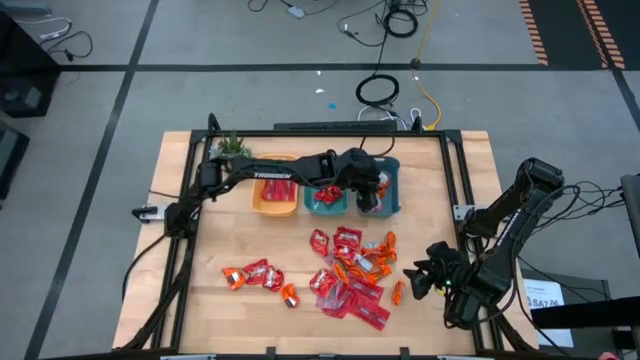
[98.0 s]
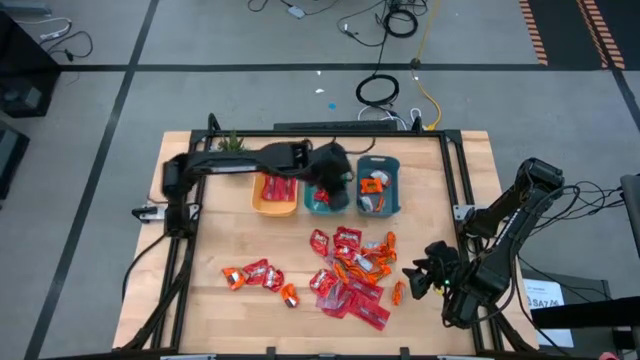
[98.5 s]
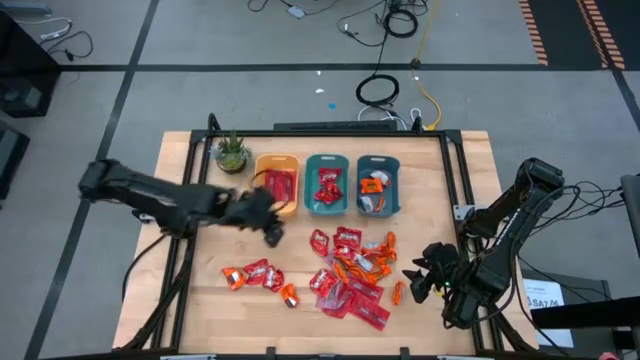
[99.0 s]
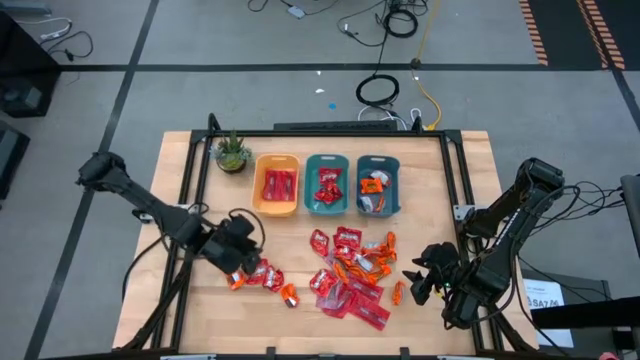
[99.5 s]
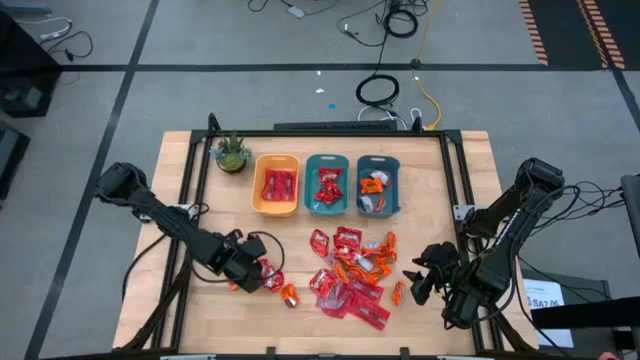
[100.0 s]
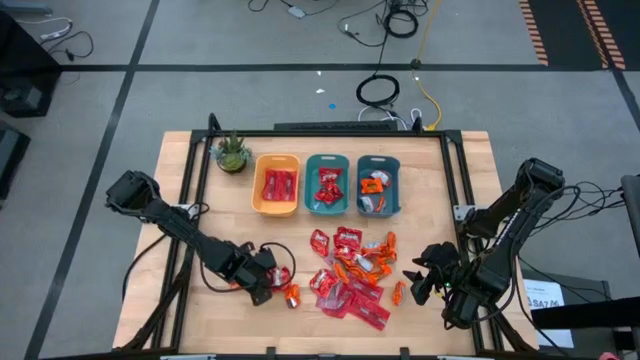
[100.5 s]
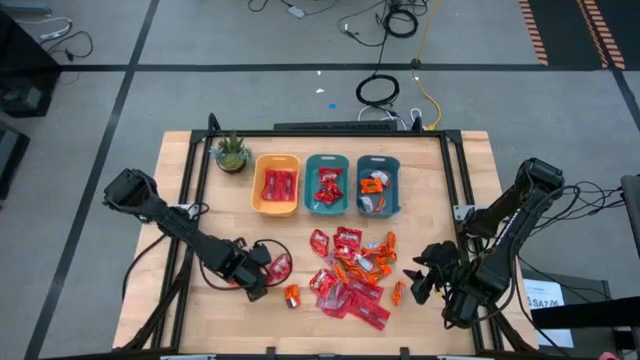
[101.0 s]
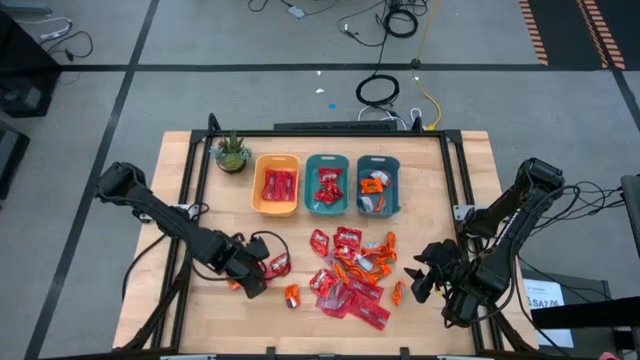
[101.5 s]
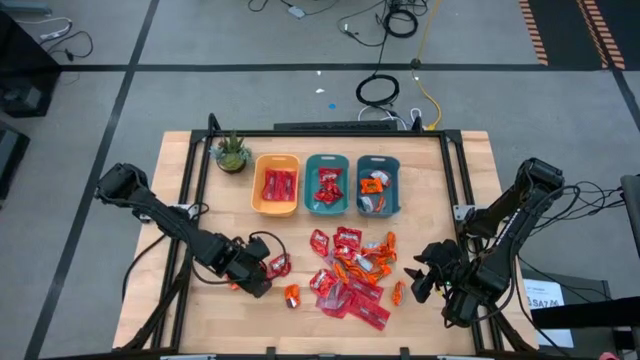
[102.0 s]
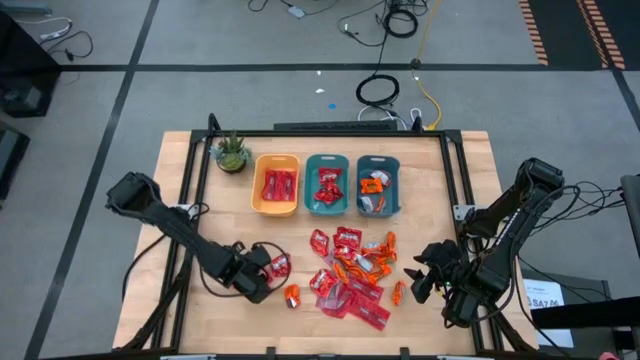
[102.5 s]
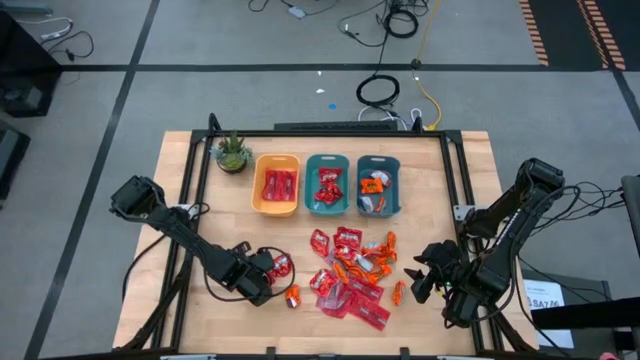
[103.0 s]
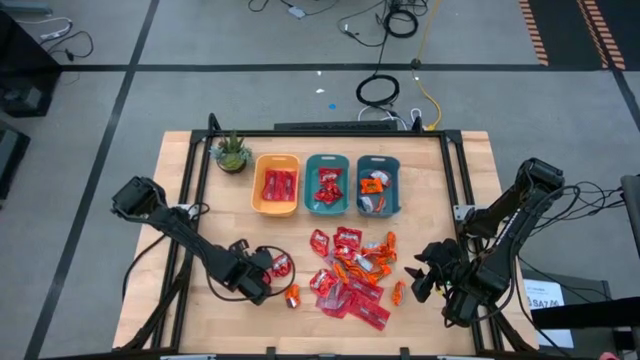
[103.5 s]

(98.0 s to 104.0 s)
Task: Sort candy
Put the red candy into the top center green bin

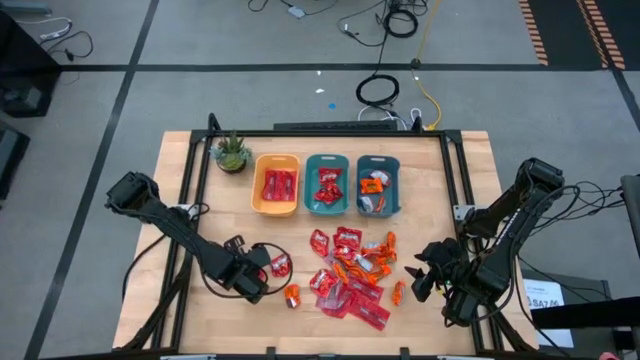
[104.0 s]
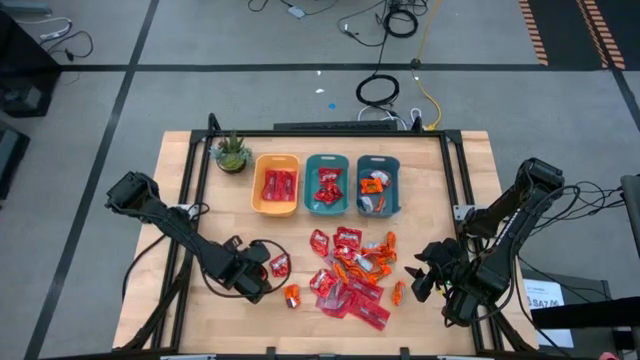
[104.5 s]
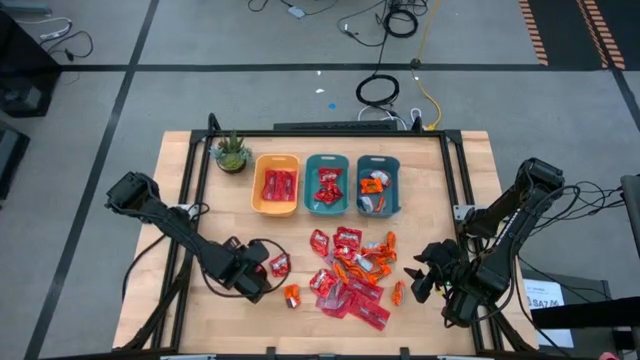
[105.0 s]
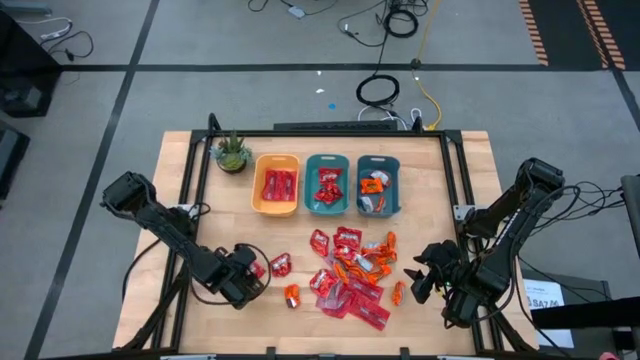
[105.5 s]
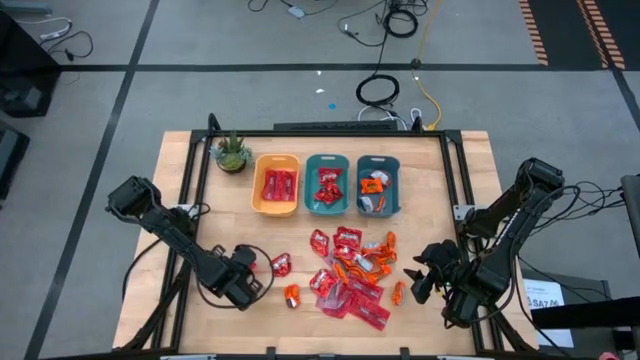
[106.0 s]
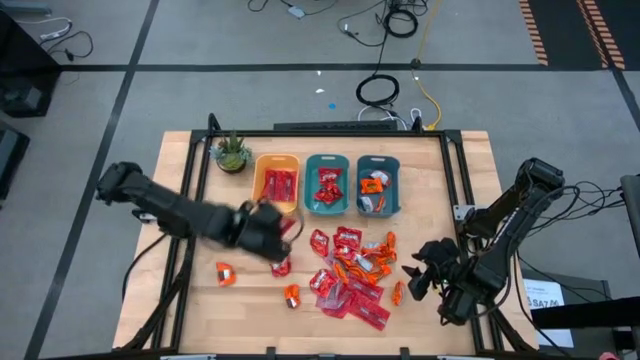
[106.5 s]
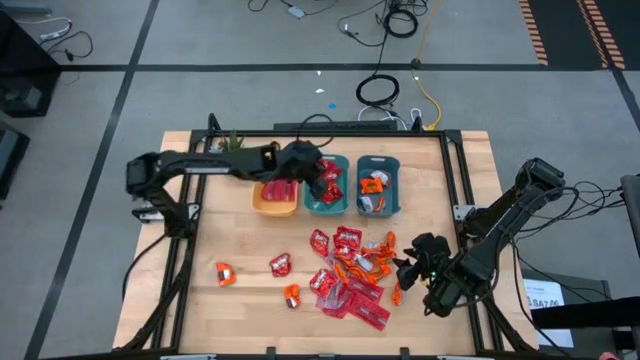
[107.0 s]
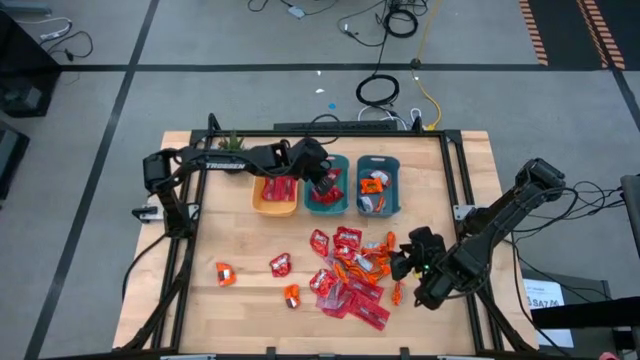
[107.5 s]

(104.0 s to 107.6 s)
Put the red candy into the top center green bin

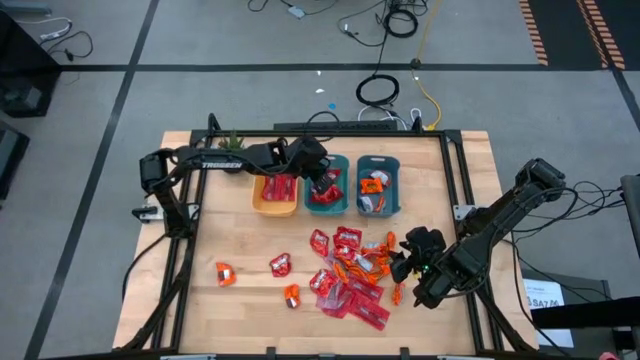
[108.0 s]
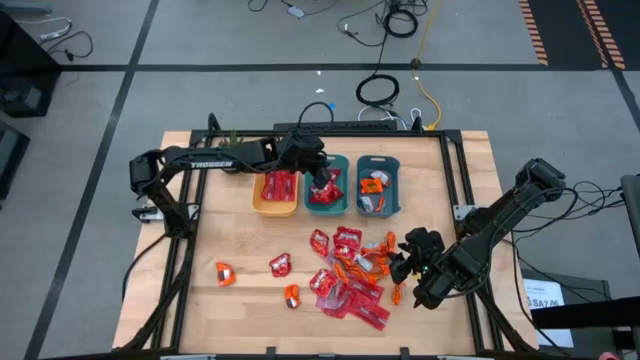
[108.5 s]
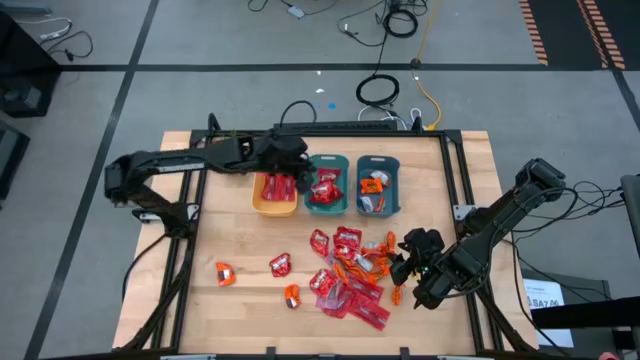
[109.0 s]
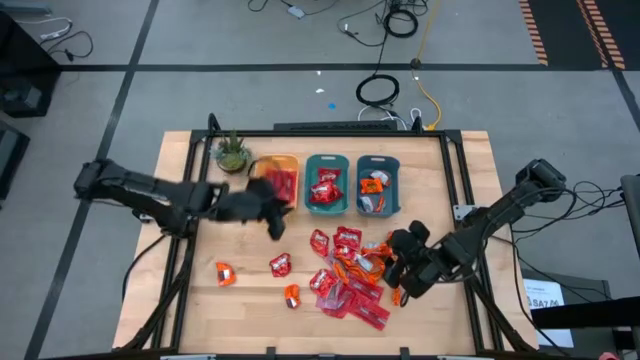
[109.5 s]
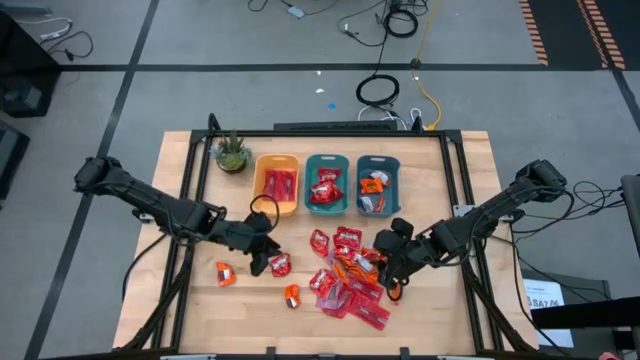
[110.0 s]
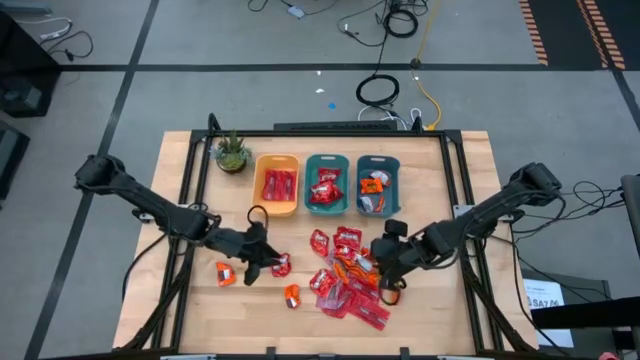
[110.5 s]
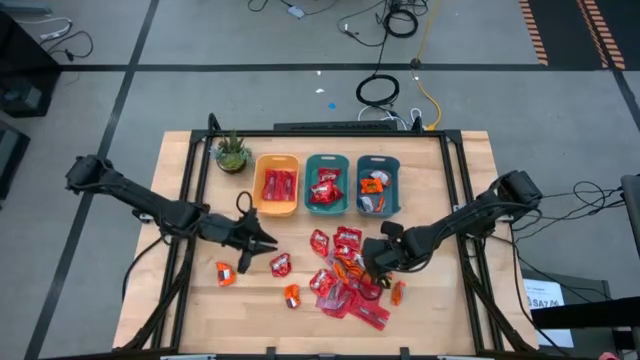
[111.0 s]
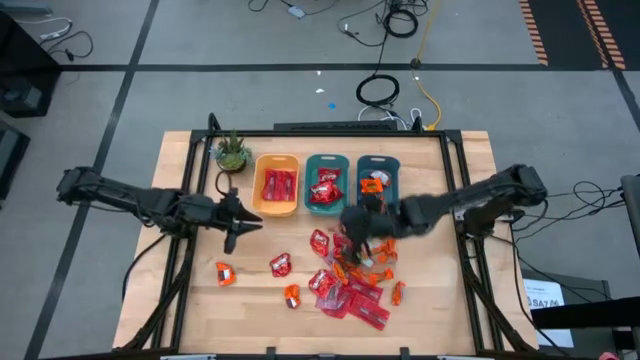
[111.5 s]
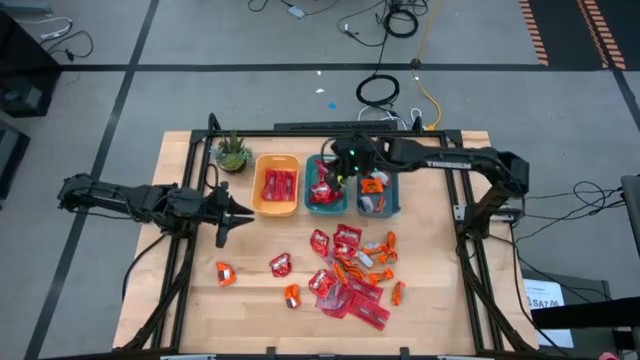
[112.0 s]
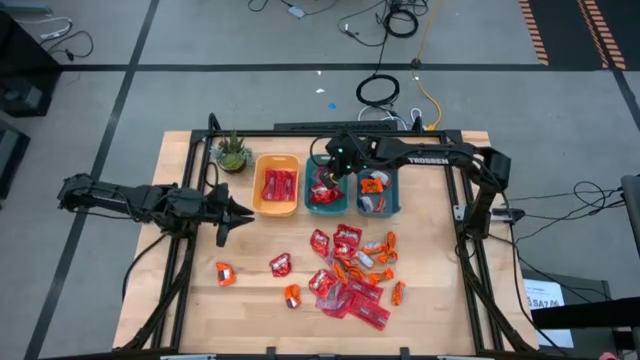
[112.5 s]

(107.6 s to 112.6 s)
Put the red candy into the top center green bin

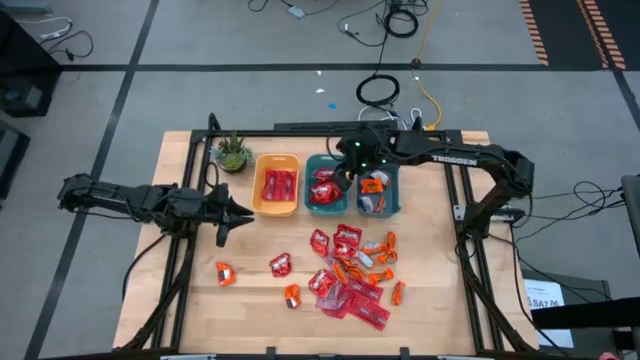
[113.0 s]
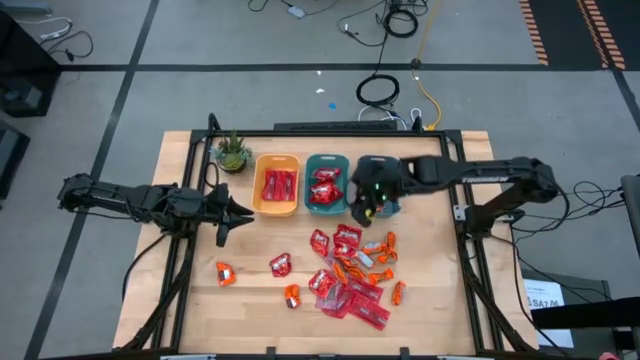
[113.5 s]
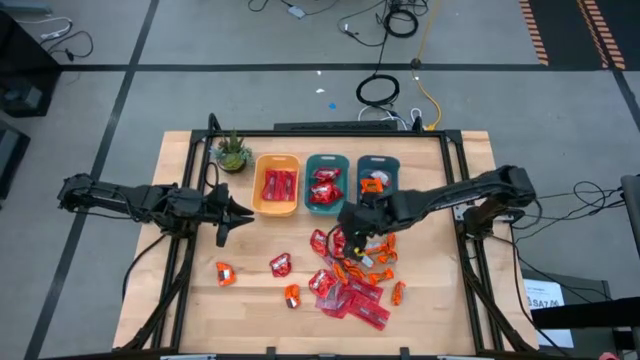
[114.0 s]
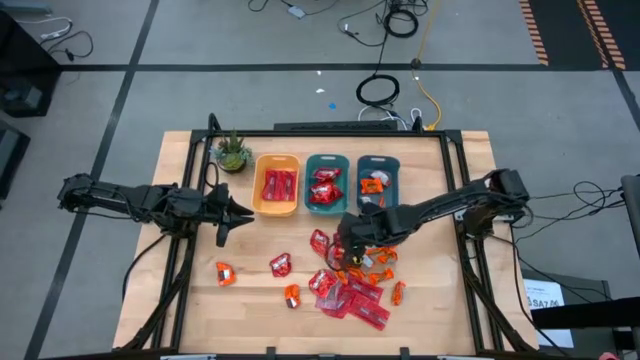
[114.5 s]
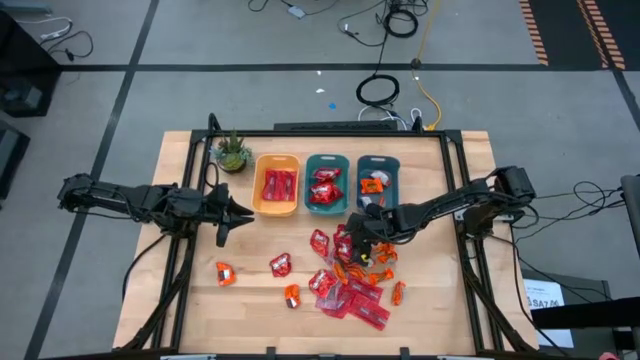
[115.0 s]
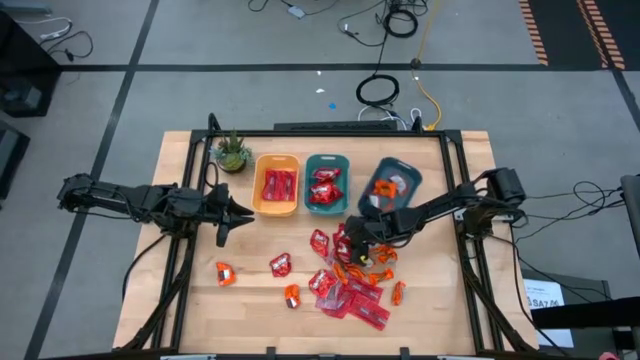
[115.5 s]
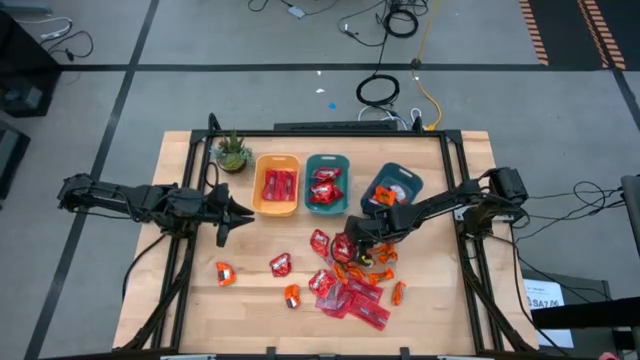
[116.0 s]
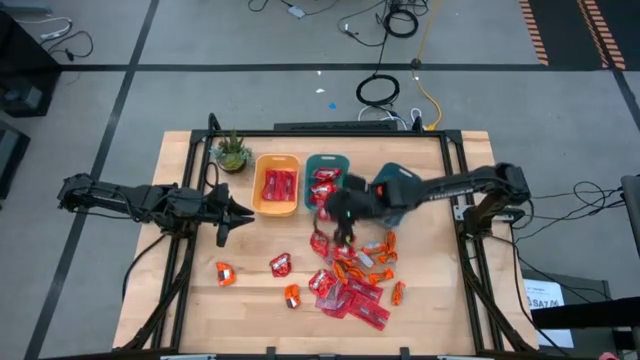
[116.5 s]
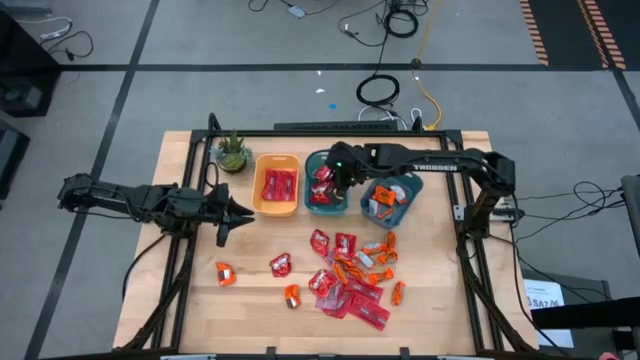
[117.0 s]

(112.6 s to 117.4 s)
Put the red candy into the top center green bin

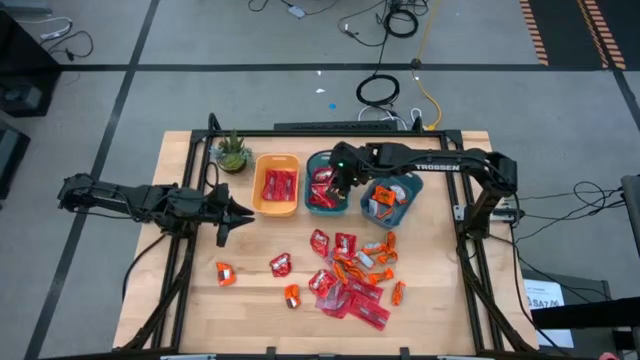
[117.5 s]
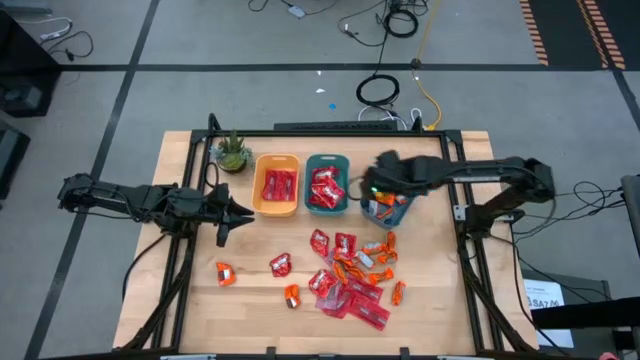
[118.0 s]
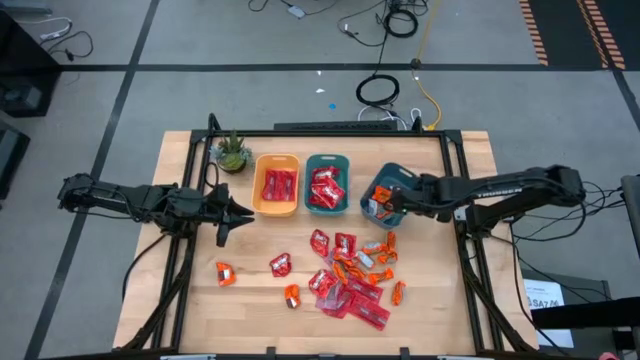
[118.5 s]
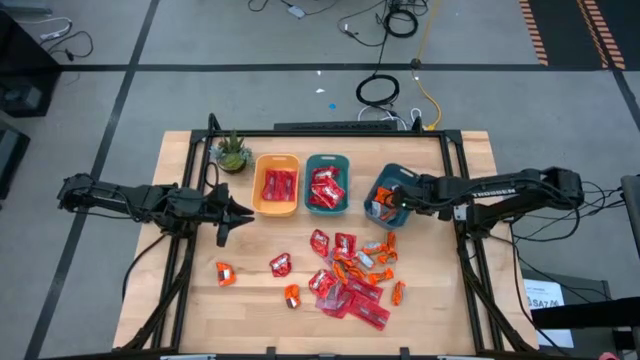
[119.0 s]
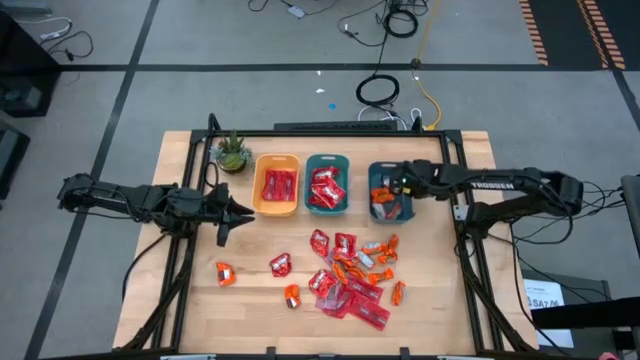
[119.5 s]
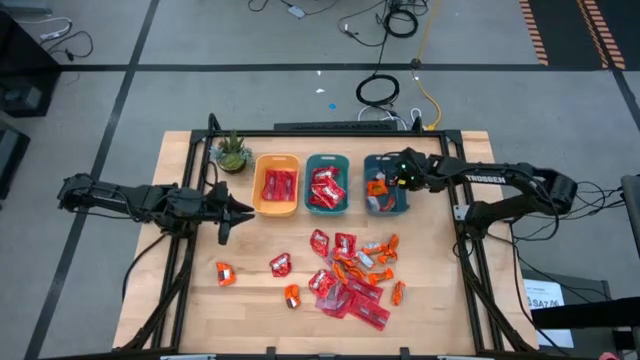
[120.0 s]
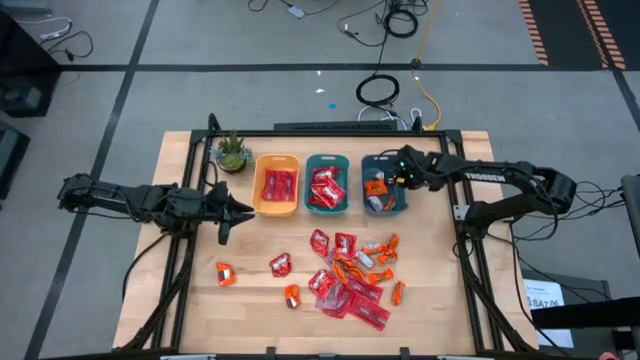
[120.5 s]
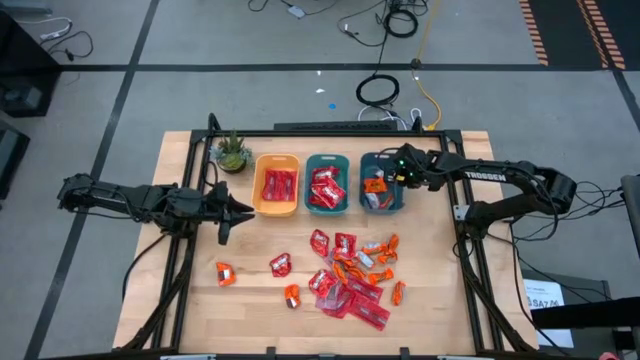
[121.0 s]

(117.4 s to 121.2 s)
Adjust the blue bin
